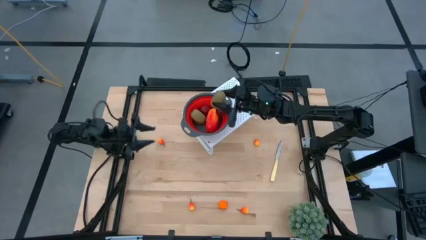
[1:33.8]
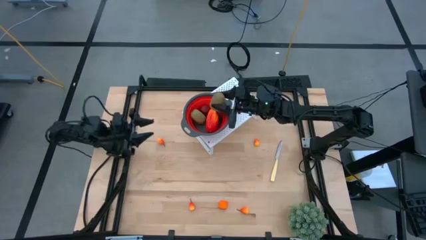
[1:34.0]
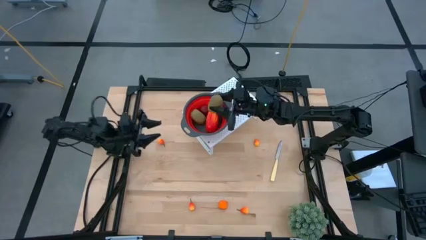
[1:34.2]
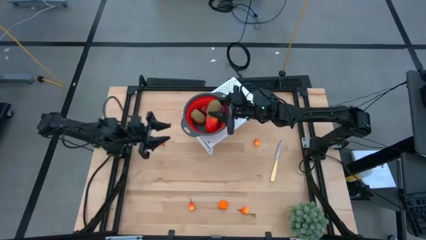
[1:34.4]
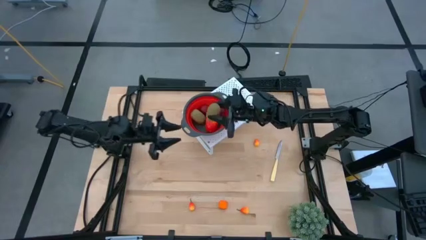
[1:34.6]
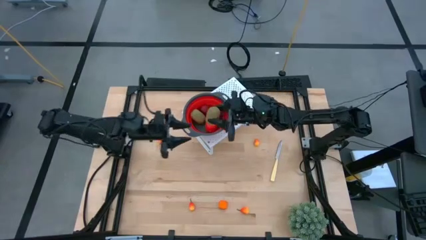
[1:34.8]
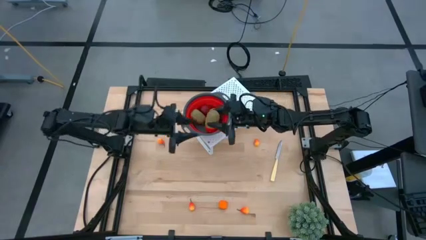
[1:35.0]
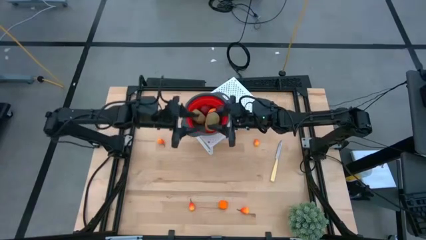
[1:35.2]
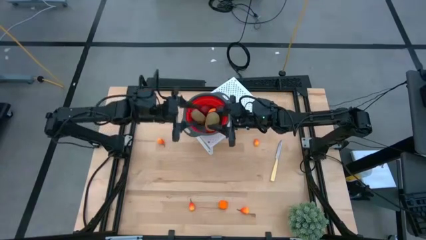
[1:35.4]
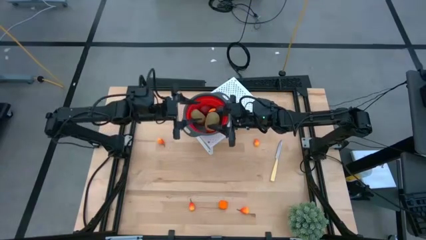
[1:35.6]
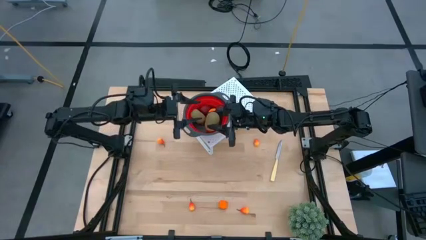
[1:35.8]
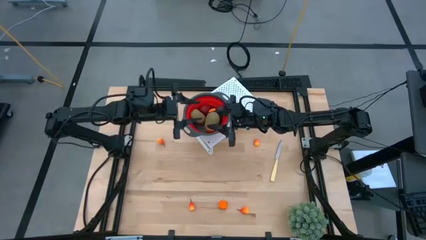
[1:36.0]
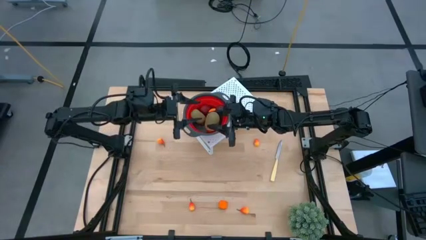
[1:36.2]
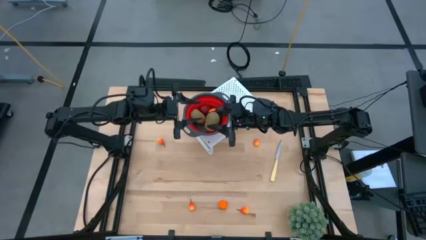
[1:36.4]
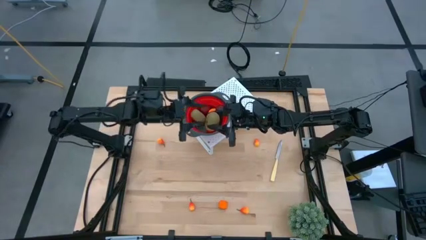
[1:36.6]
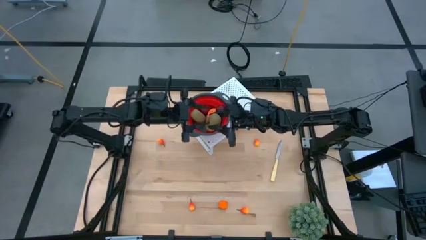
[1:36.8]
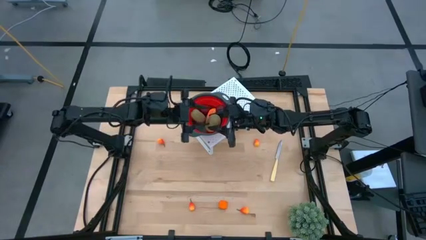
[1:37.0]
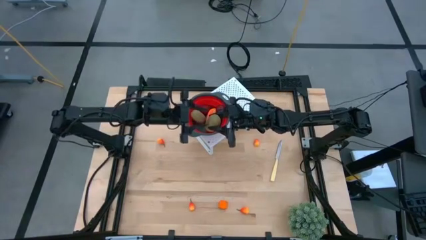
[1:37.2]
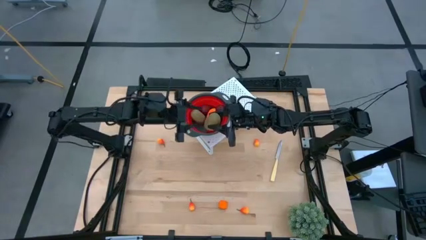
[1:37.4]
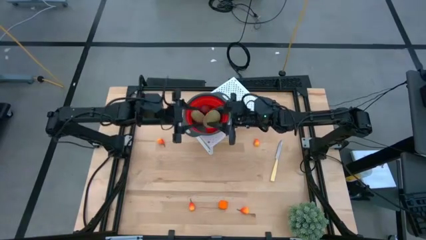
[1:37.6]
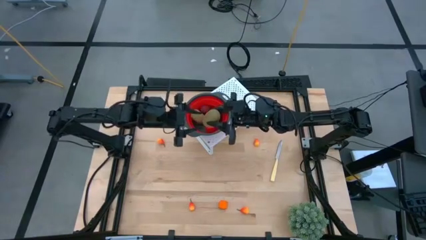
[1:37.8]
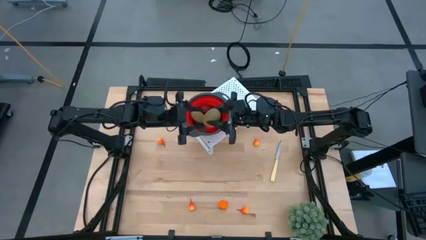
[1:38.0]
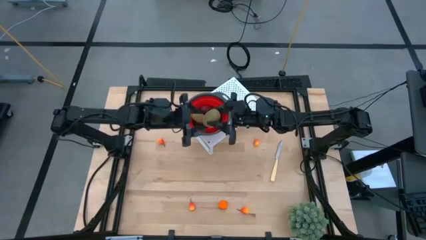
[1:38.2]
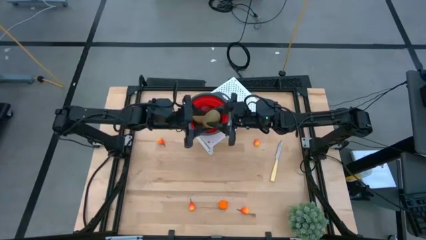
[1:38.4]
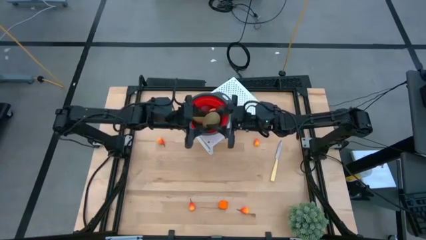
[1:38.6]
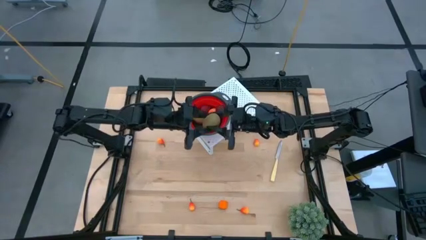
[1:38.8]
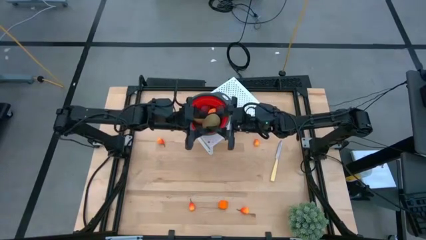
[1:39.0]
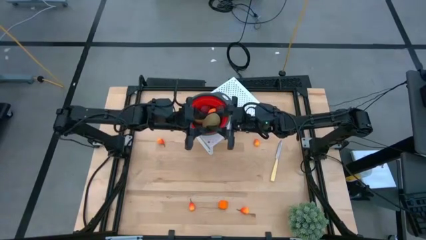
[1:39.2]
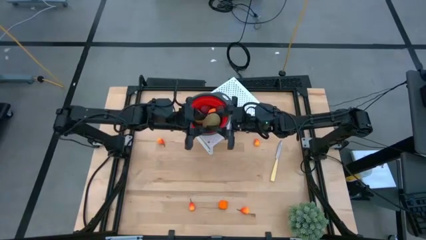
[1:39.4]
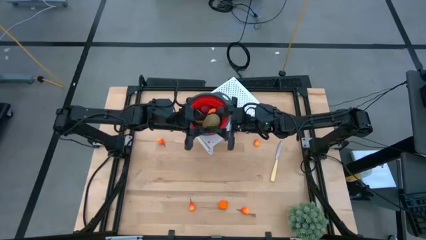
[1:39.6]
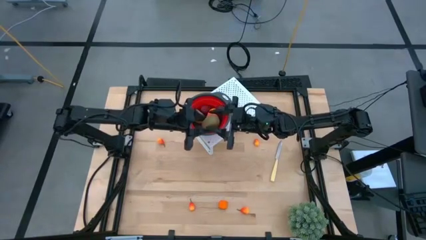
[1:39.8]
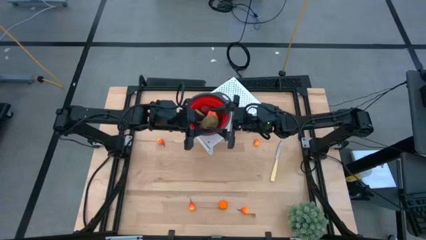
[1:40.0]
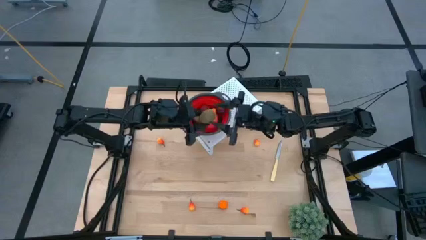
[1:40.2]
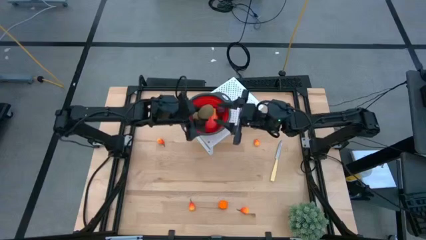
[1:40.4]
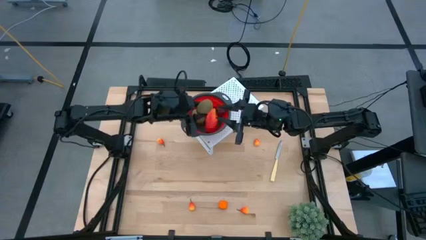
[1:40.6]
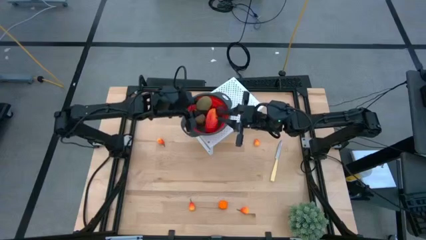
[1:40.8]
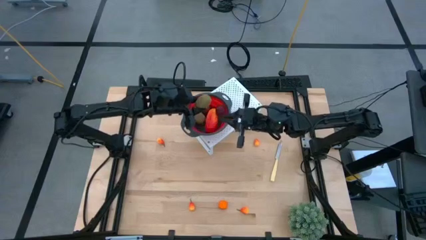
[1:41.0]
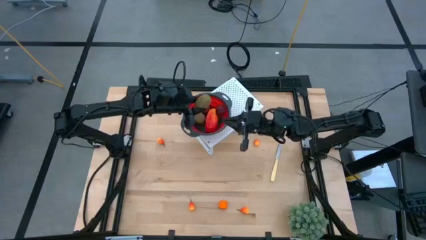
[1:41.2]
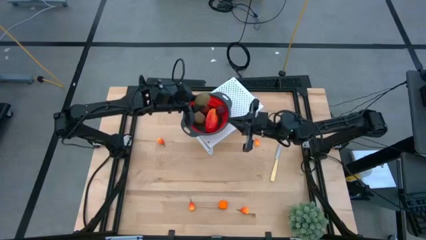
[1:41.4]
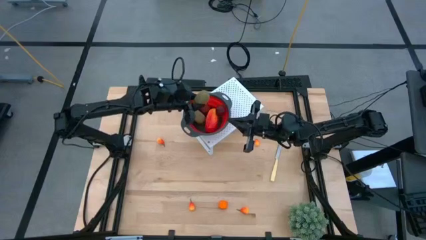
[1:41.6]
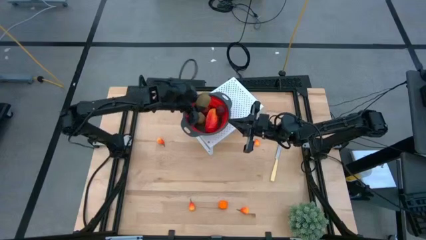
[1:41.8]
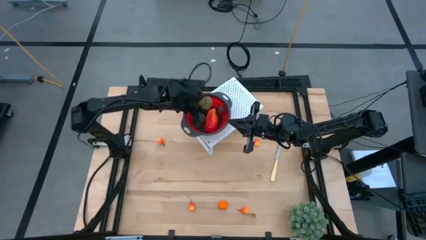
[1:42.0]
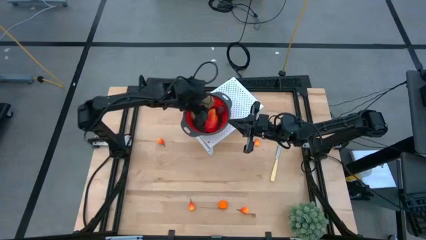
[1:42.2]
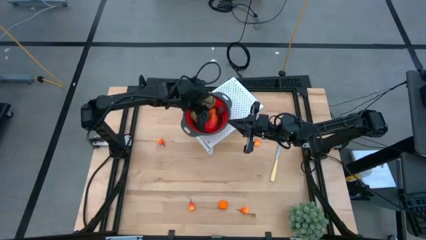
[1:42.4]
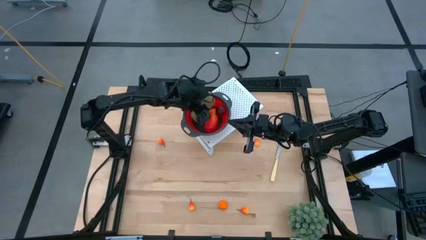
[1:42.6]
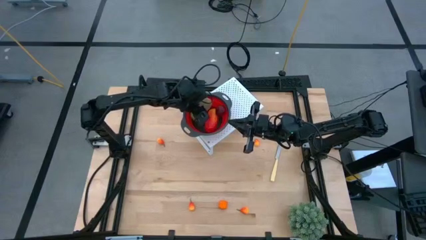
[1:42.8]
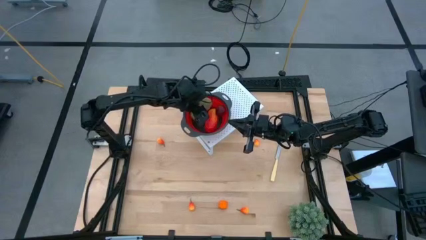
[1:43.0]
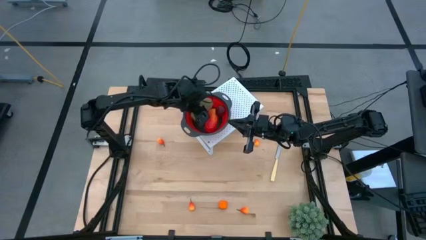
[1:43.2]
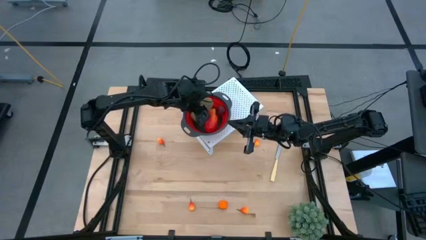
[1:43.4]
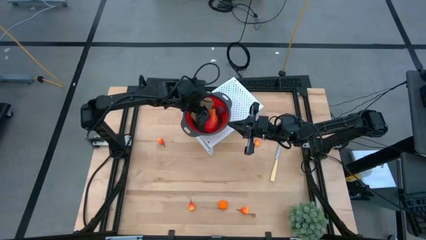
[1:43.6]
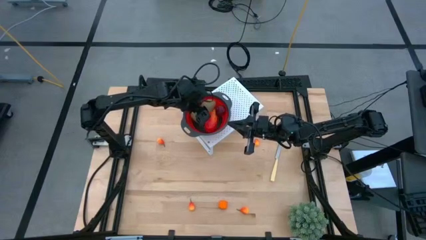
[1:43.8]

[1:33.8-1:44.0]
Task: Pick & Place Fruit
Put the kiwi into the red strainer bowl on the shelf

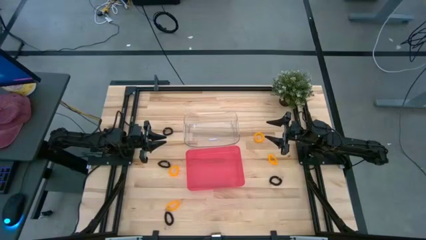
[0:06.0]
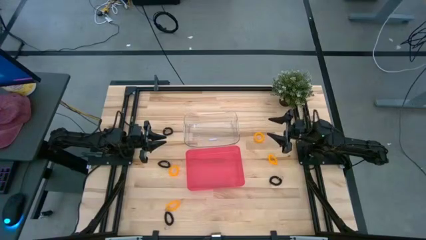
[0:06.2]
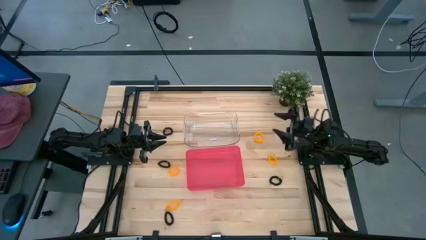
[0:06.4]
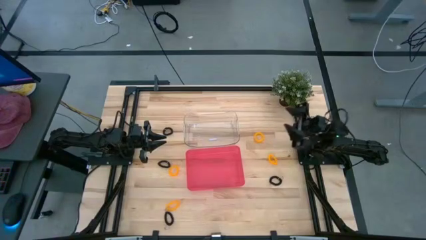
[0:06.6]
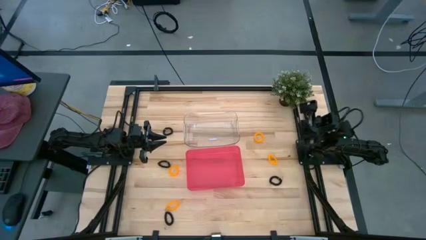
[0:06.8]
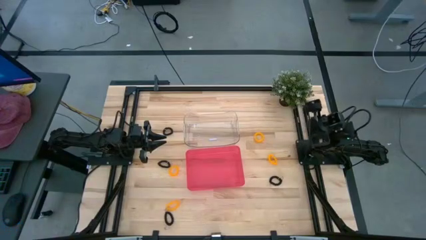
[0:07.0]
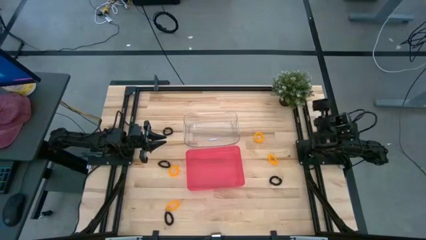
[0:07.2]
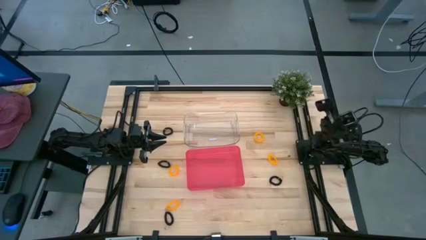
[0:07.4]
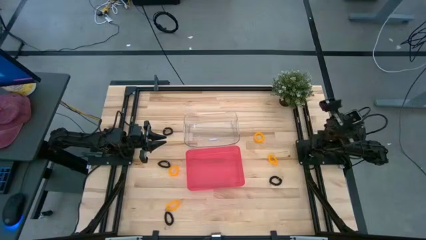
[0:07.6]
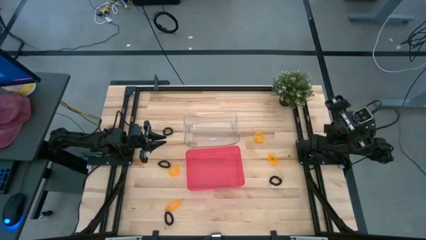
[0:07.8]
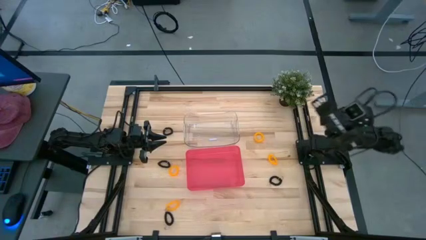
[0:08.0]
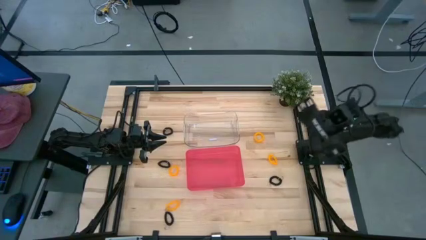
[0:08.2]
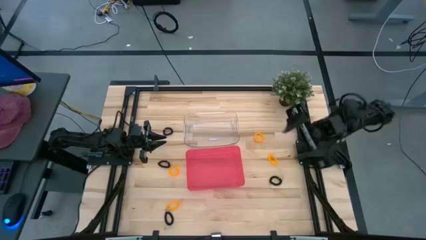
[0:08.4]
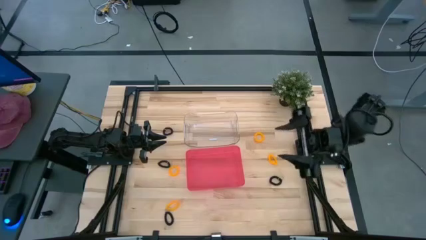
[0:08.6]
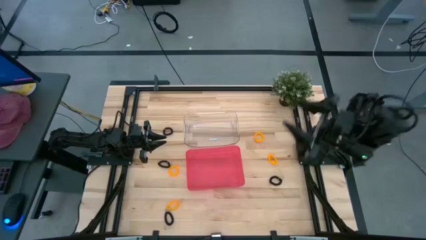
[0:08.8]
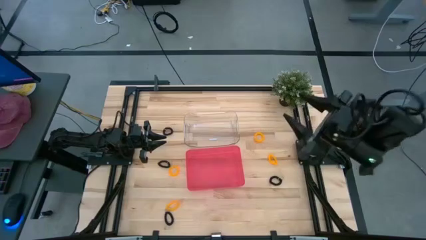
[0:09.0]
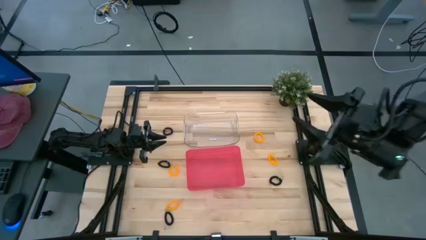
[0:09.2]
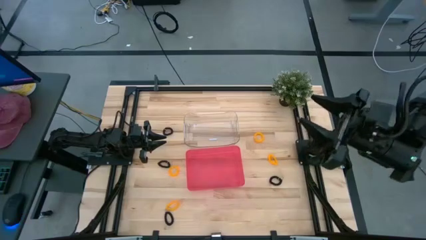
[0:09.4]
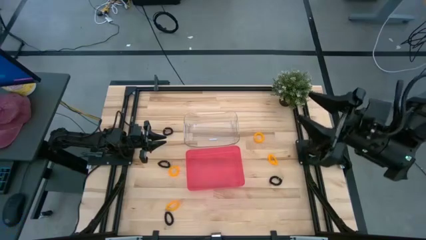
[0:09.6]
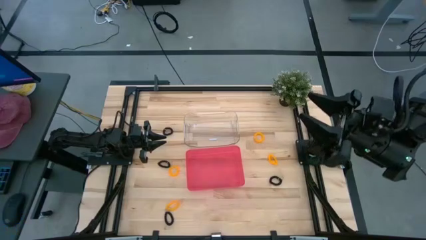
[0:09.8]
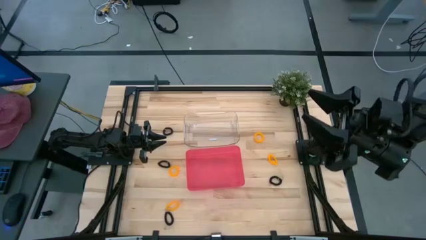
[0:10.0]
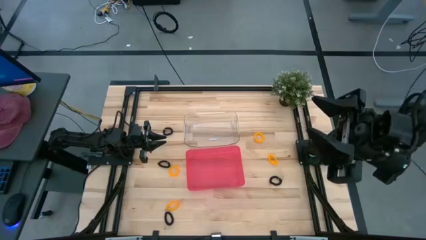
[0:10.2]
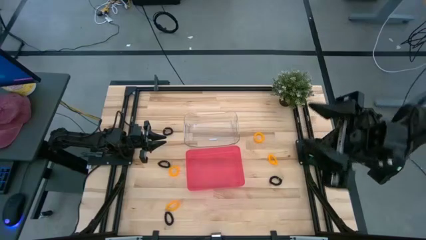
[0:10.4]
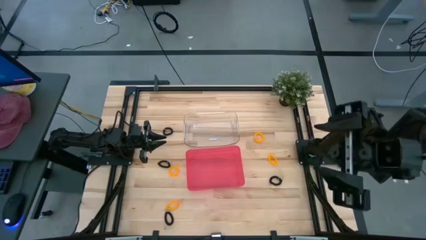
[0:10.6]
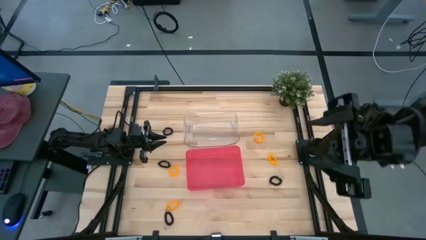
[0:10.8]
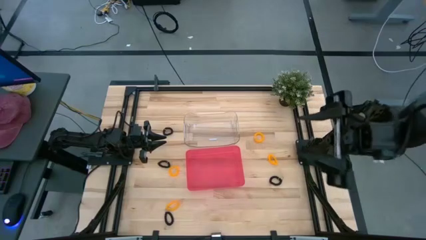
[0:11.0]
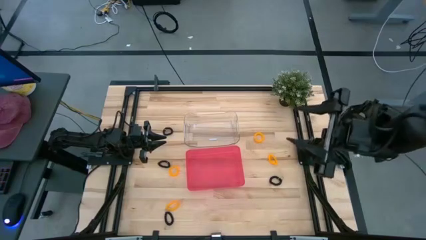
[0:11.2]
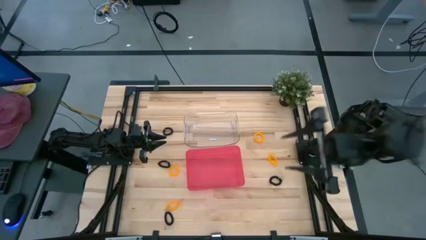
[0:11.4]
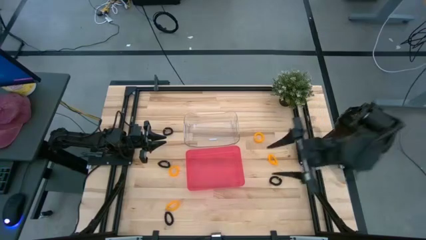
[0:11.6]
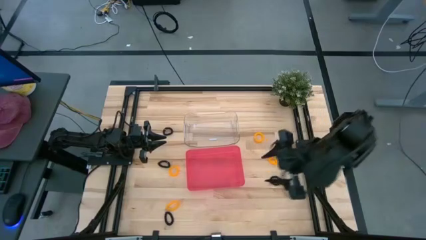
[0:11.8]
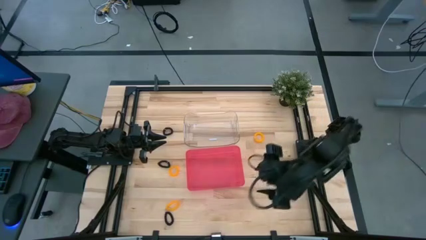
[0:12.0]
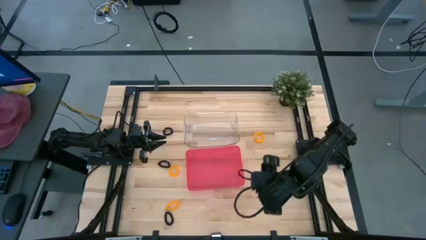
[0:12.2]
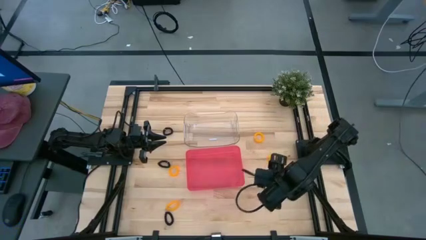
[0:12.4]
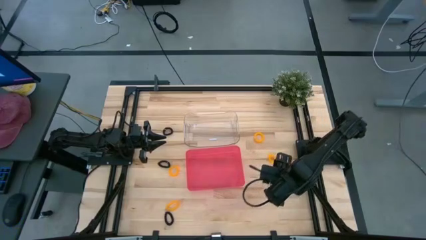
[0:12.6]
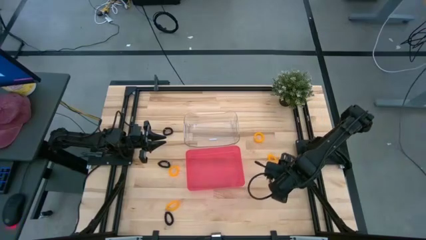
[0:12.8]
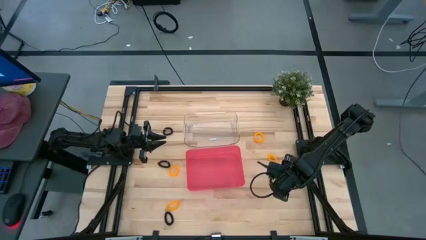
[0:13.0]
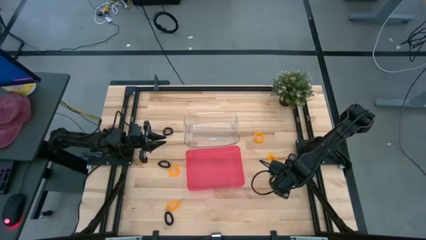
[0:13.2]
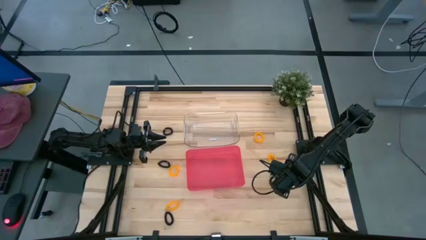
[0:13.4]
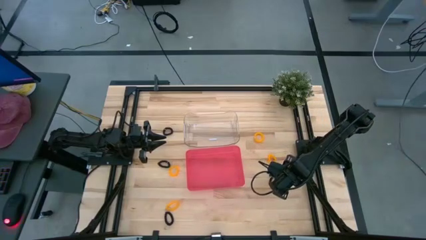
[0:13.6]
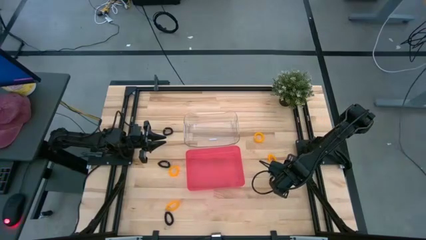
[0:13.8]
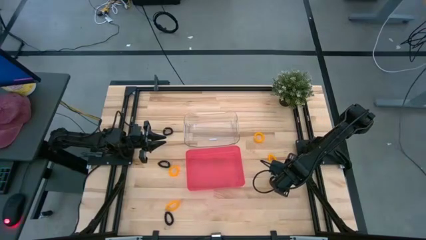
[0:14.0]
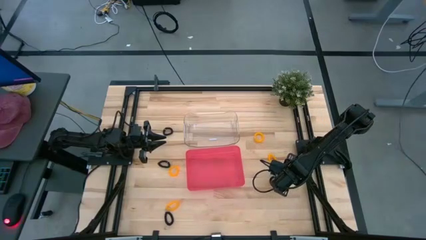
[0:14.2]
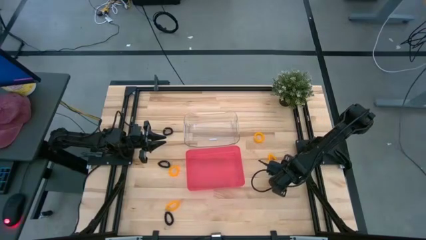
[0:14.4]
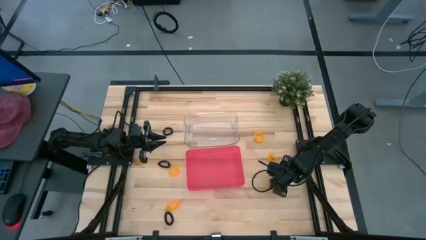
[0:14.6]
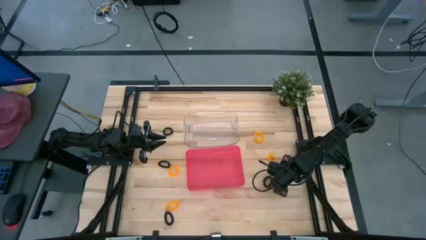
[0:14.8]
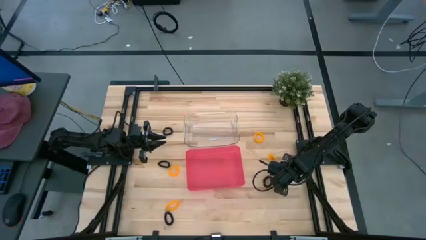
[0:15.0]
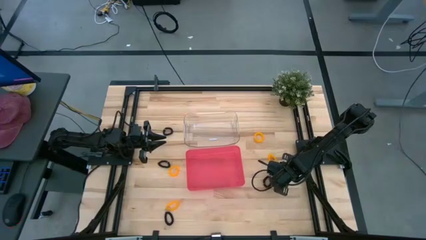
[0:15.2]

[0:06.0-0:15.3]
Task: Sort spring keychains
Put the black spring keychain into the red bin
